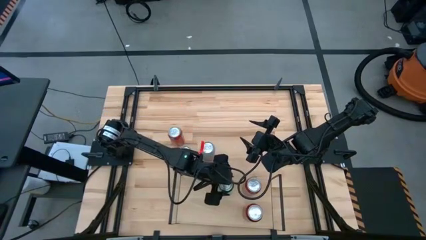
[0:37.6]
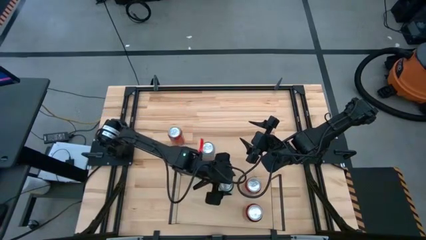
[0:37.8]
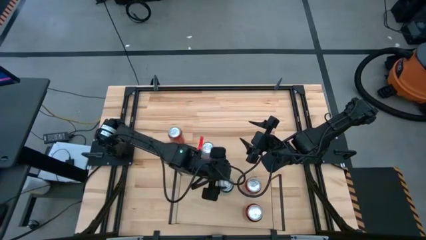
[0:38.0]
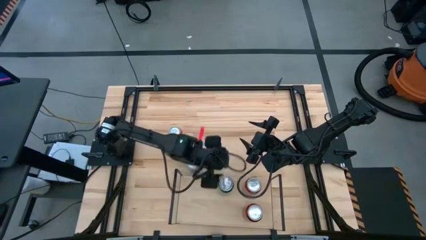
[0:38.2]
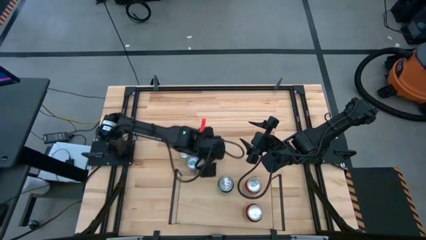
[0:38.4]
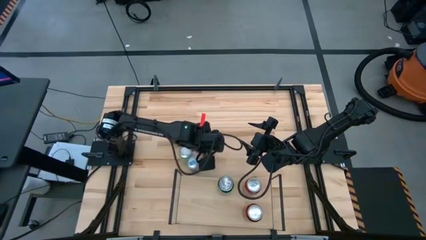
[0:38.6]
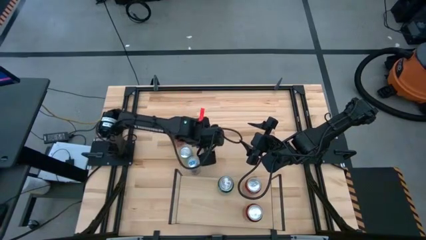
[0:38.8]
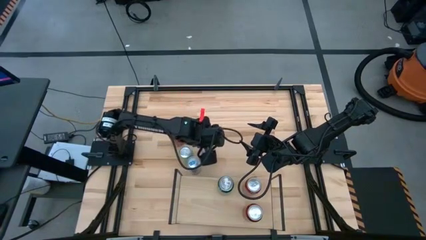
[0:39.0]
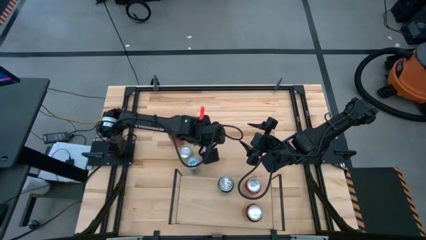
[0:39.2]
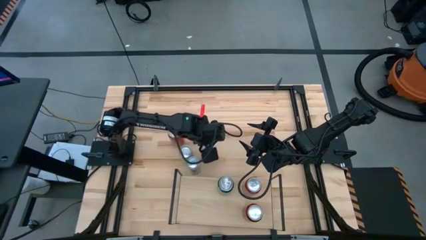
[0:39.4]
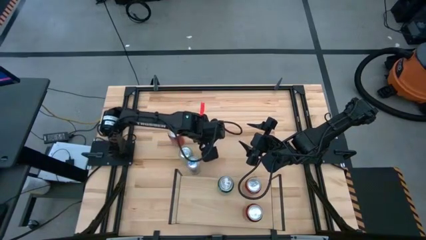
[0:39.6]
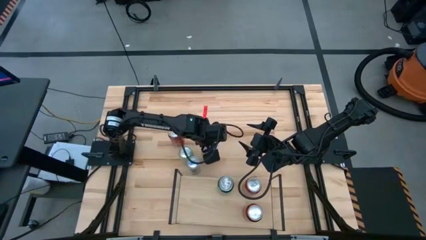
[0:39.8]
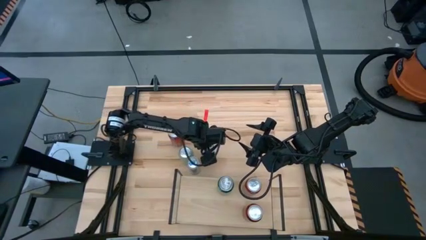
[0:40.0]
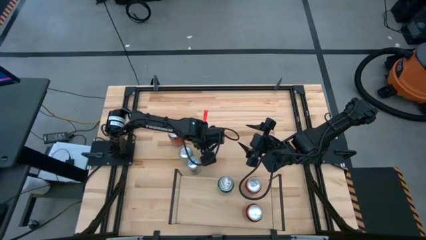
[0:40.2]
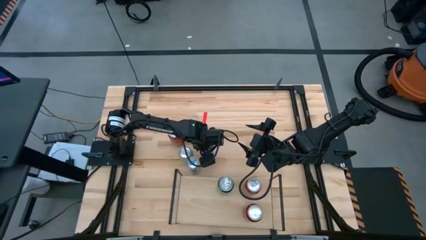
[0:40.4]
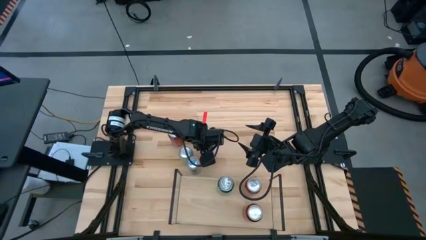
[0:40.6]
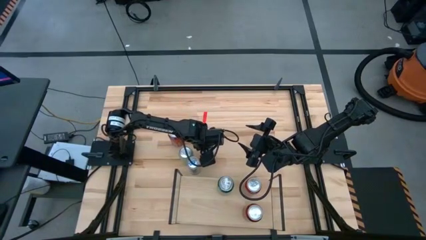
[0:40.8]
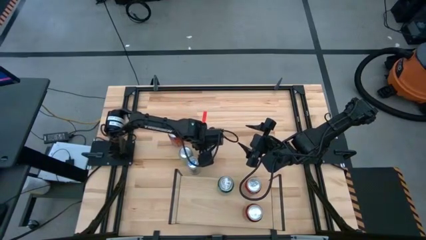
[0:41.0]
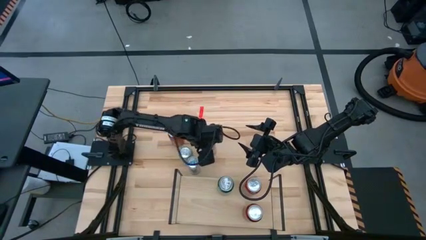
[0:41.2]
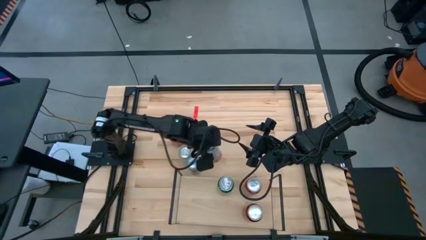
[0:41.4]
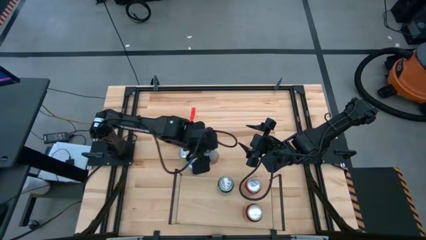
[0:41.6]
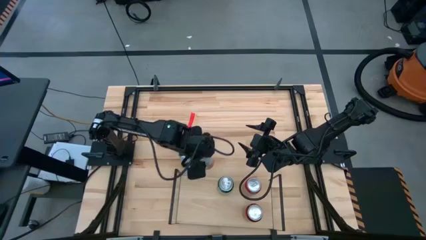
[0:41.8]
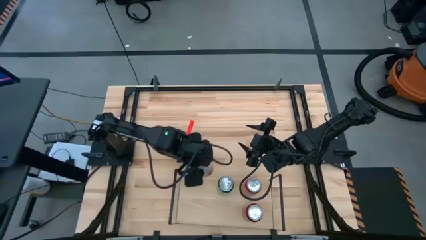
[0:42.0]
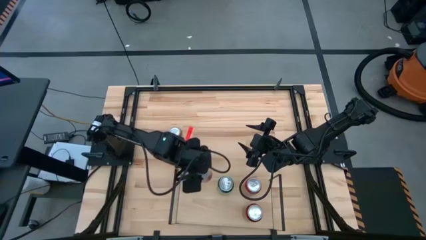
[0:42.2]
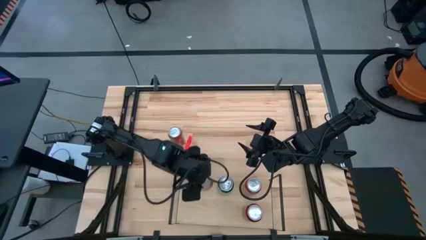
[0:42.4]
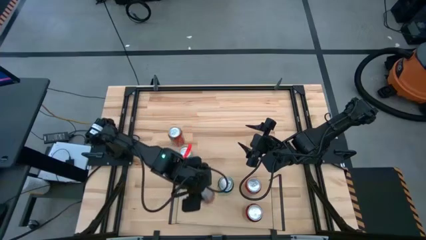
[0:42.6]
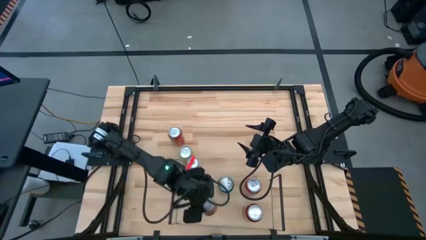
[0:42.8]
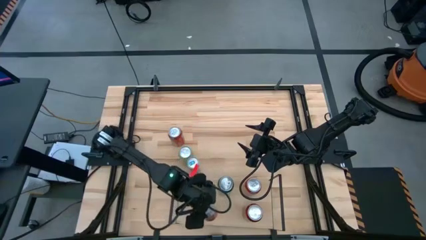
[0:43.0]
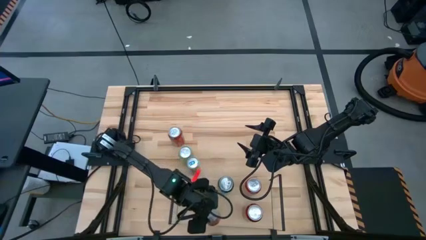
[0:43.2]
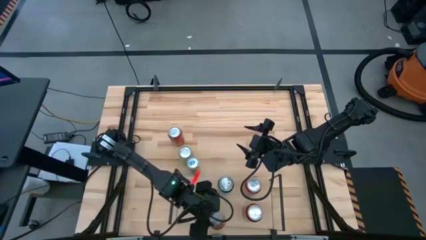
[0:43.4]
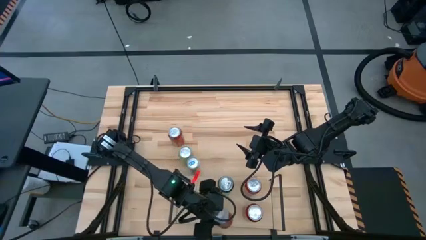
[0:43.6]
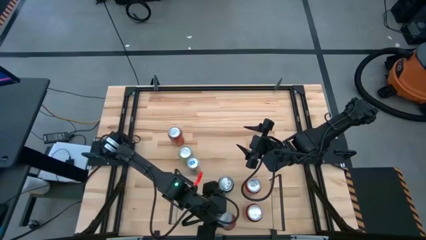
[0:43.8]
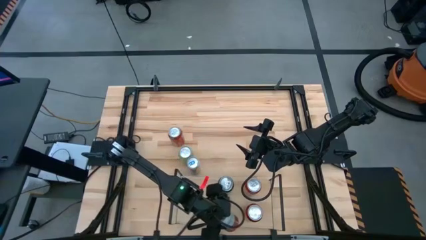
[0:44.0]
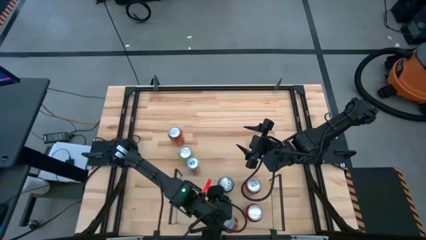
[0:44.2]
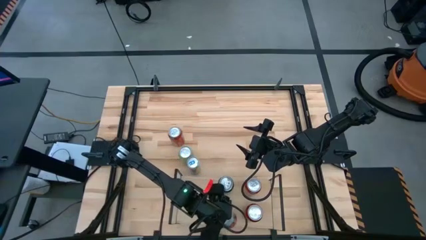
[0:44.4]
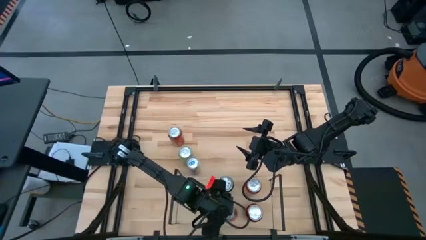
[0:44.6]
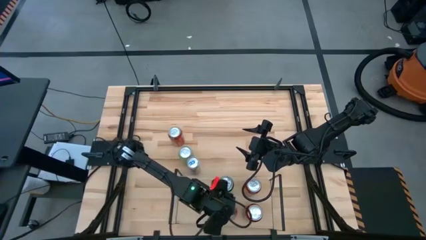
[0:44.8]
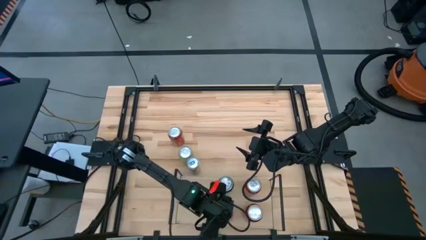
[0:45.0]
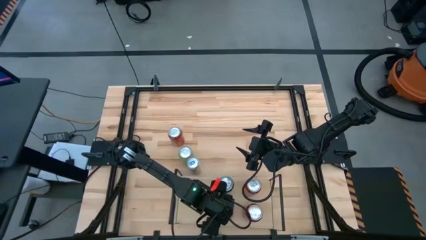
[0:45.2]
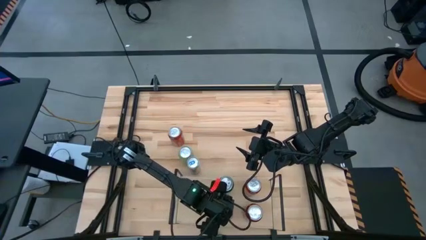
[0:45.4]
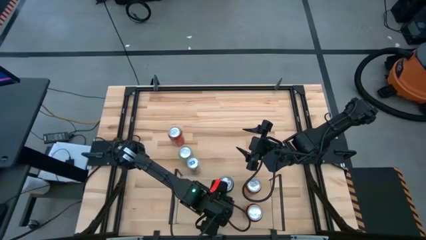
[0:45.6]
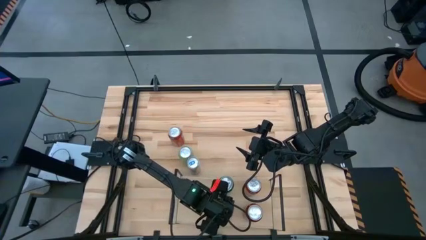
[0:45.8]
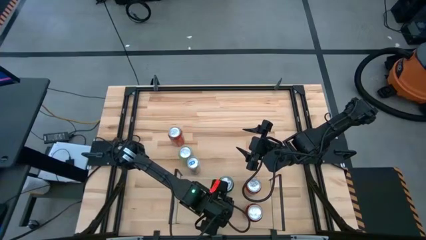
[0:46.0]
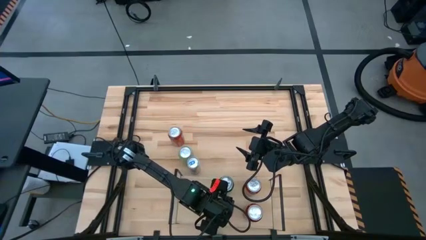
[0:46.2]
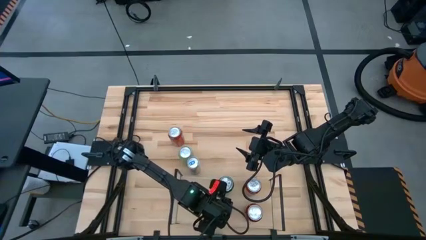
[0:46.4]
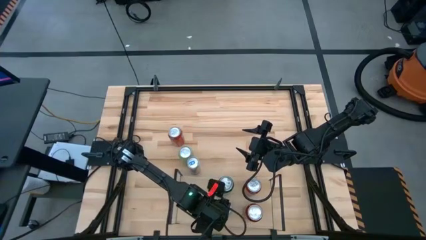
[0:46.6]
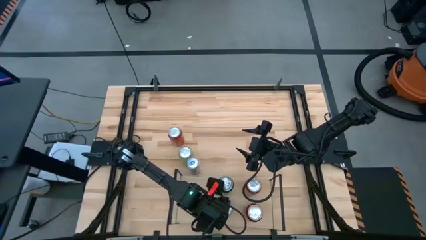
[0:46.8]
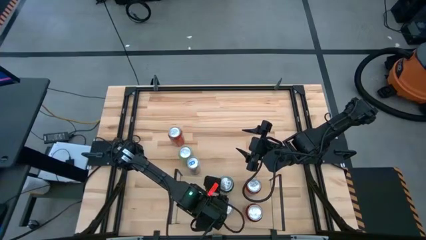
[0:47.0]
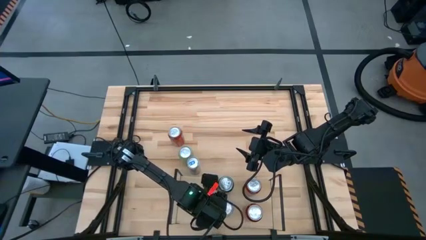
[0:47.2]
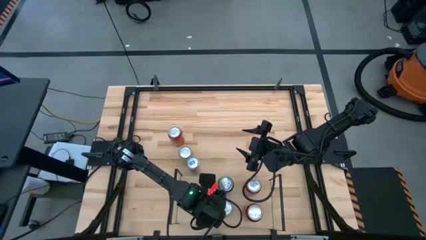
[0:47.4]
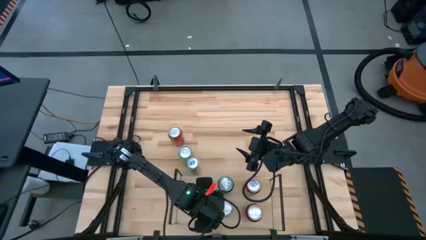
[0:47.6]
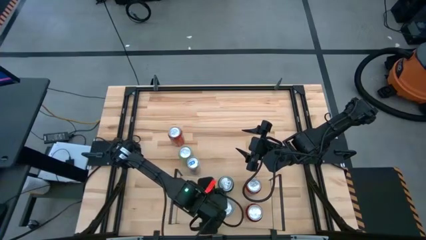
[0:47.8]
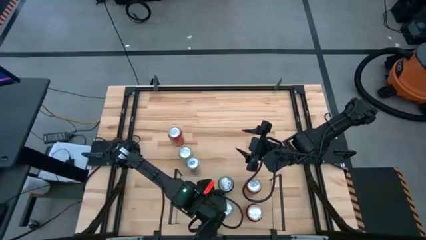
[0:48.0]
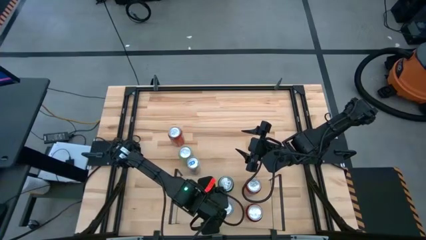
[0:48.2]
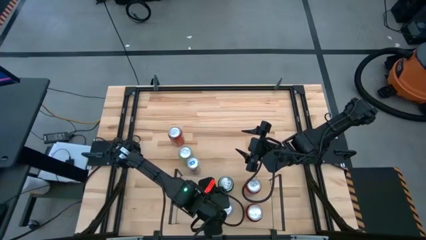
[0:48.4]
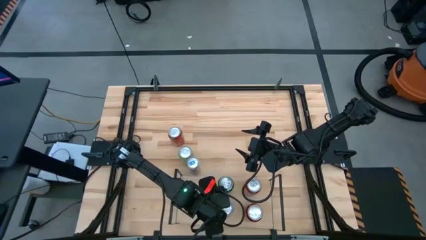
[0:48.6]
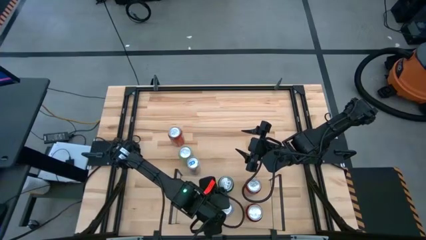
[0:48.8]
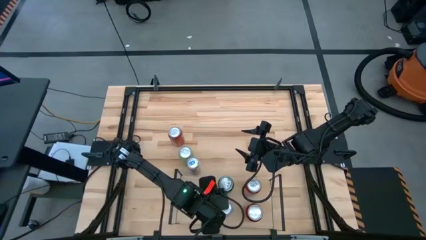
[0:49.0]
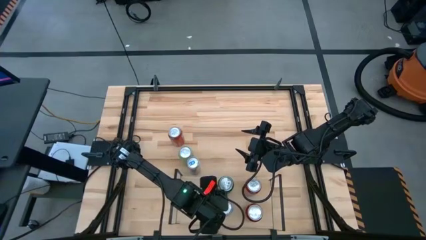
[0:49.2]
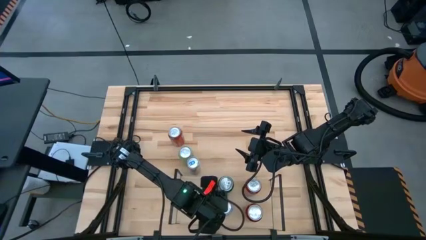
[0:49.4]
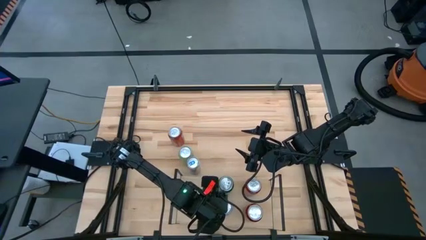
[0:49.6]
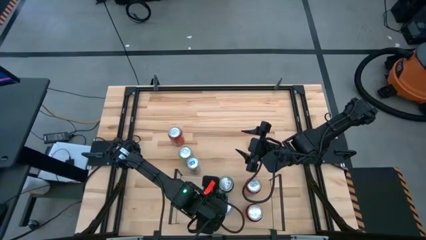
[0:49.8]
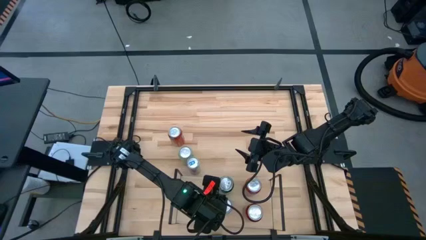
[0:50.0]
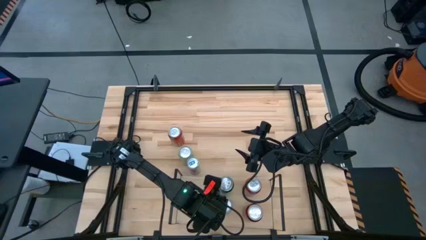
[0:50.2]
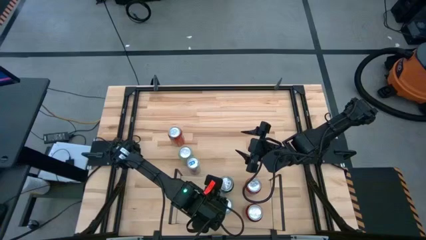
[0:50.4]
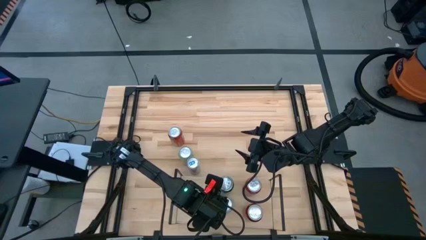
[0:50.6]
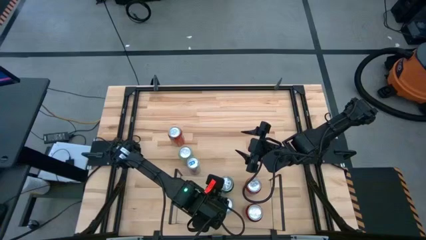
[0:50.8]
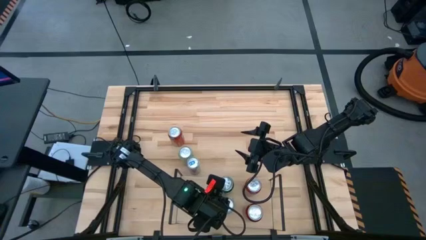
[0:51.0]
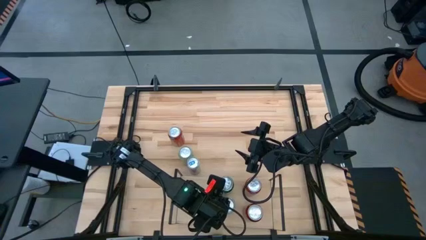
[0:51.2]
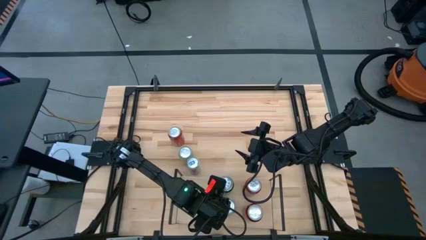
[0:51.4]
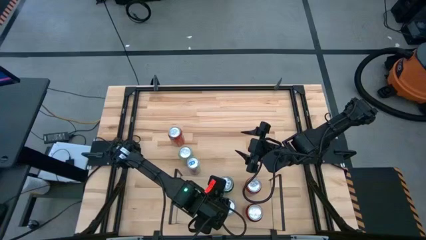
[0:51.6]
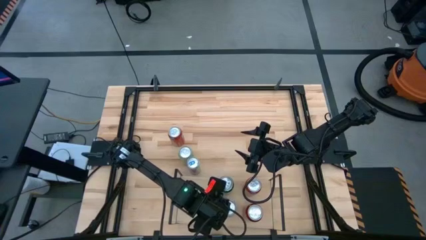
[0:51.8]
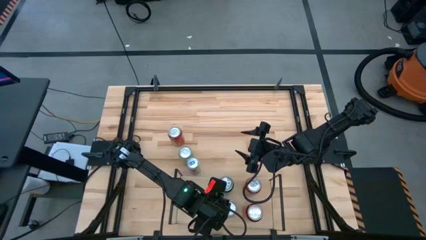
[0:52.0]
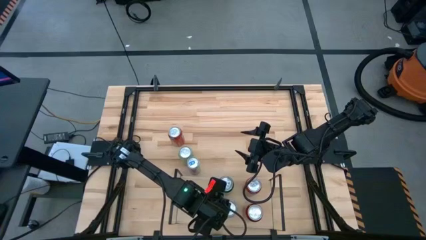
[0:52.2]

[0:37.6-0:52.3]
Task: Place canned beverage on shelf
Put the orange white soda can on the shelf

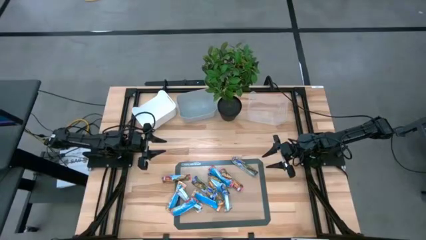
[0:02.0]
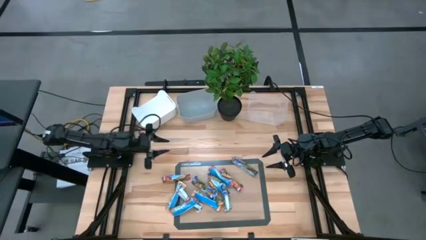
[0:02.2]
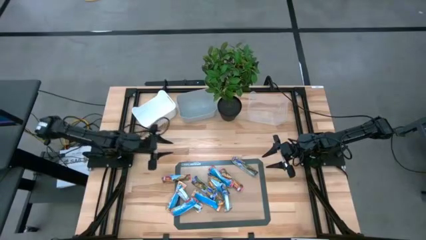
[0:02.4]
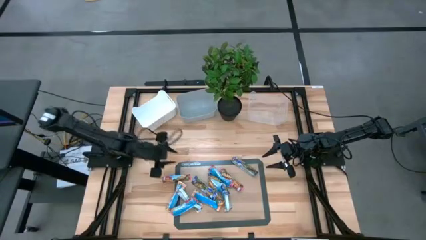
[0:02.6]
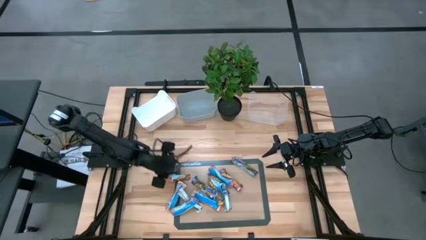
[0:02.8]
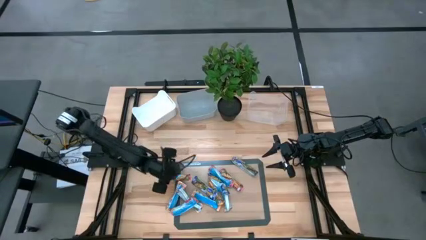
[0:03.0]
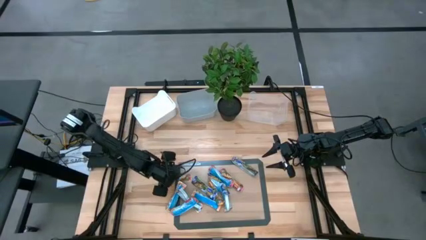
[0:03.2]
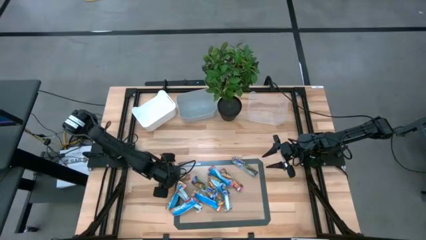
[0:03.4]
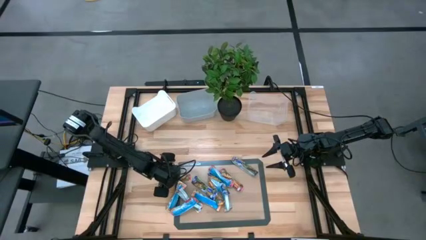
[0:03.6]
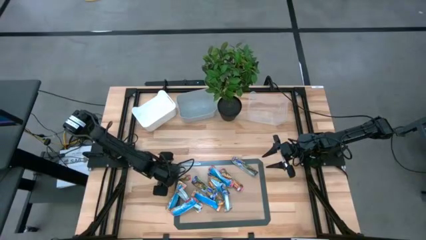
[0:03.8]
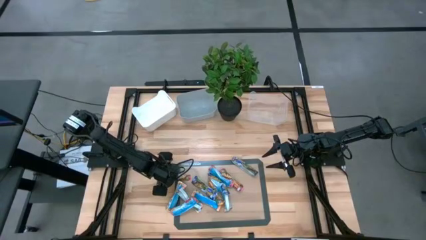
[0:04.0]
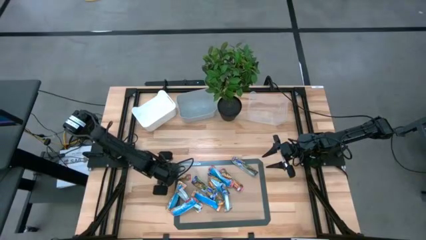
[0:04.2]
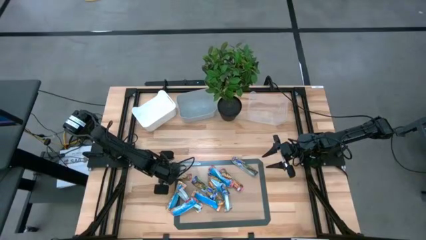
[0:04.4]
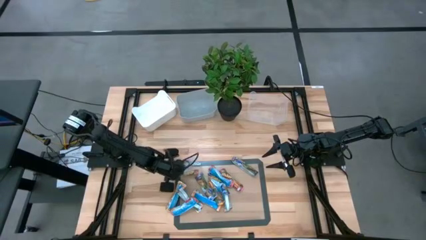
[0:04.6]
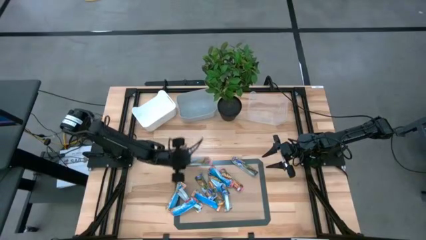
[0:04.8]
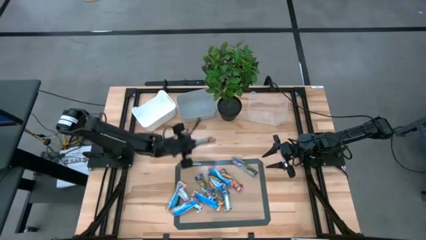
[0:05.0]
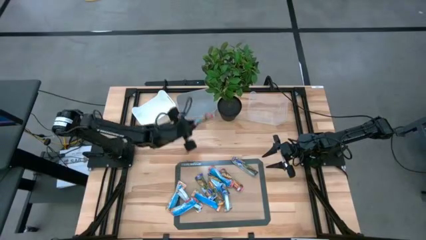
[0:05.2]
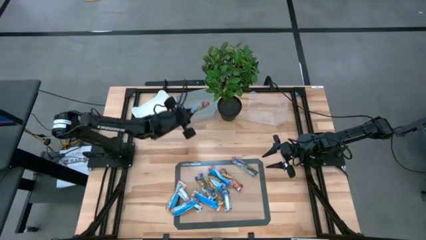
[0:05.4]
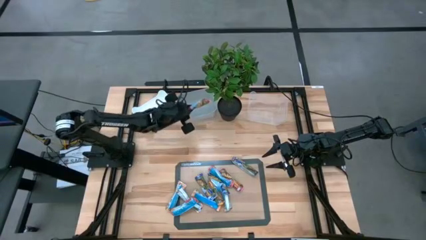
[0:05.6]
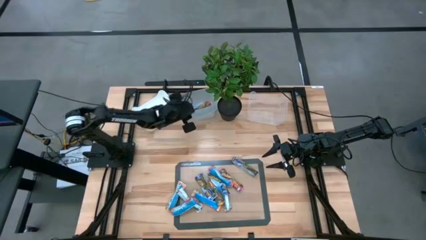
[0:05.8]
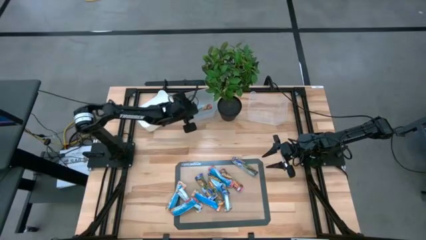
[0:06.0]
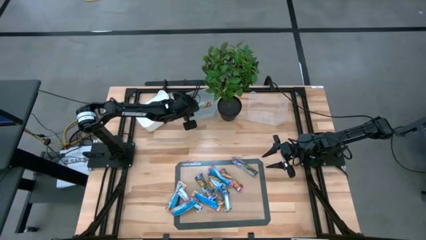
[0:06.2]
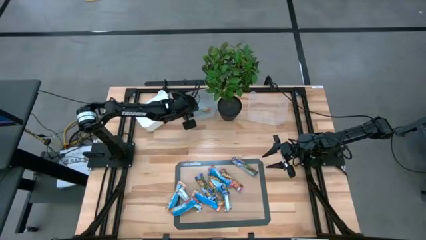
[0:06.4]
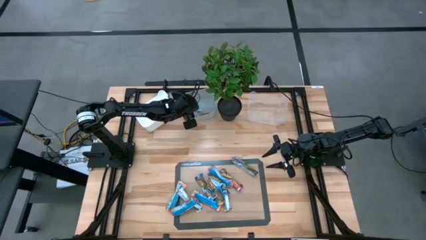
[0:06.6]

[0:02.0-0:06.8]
Task: Pick and place Granola Bars by type
Put the red granola bar into the gray bin
